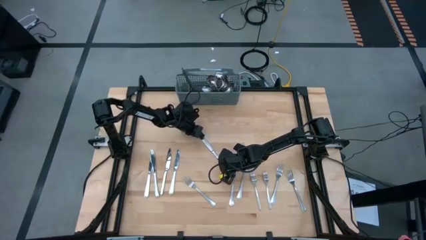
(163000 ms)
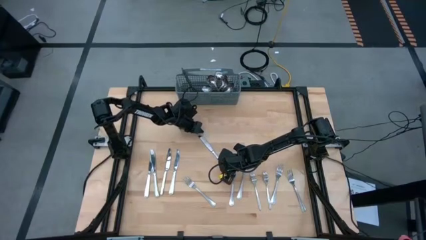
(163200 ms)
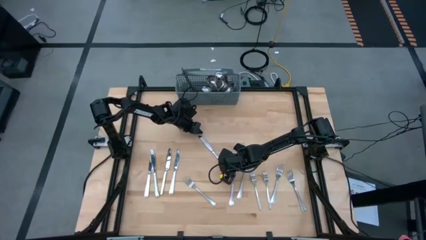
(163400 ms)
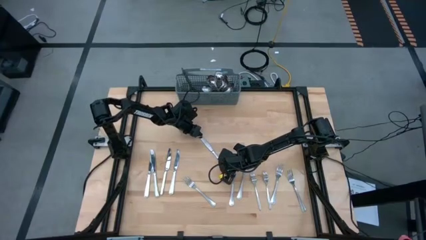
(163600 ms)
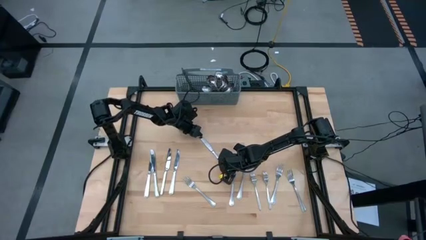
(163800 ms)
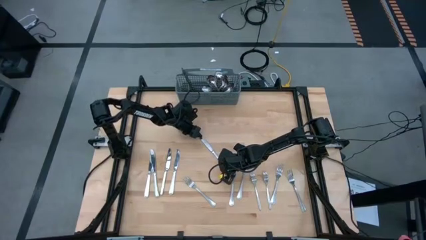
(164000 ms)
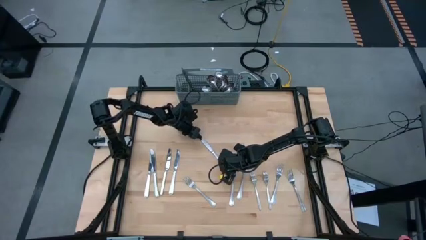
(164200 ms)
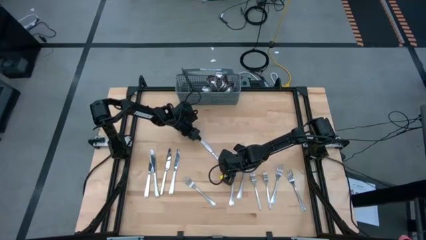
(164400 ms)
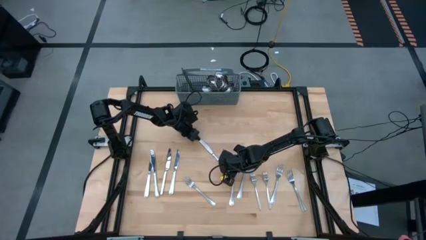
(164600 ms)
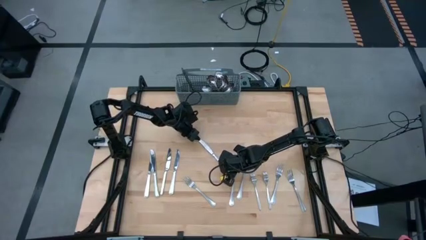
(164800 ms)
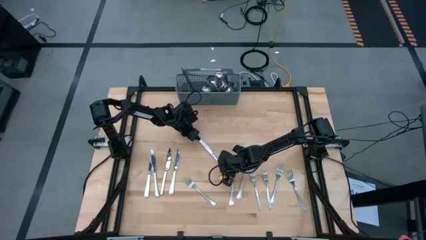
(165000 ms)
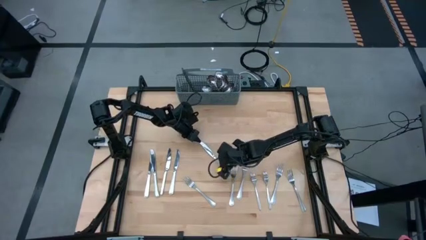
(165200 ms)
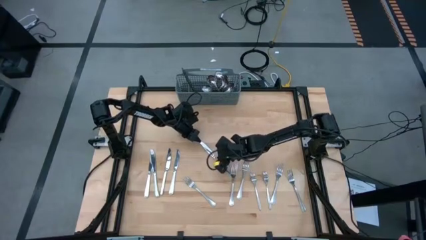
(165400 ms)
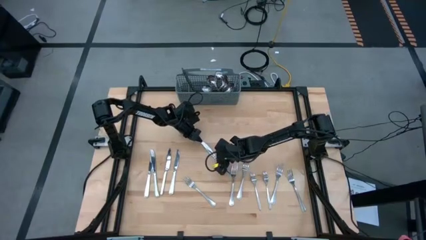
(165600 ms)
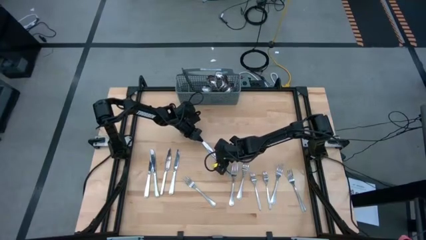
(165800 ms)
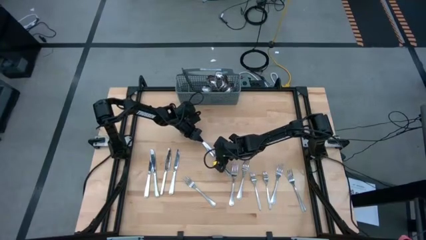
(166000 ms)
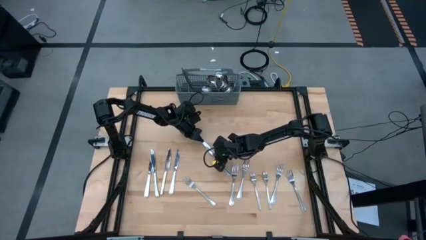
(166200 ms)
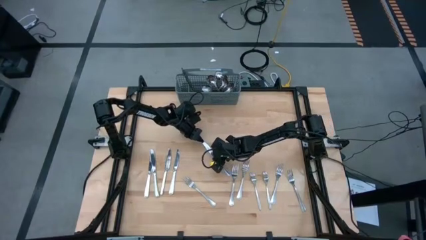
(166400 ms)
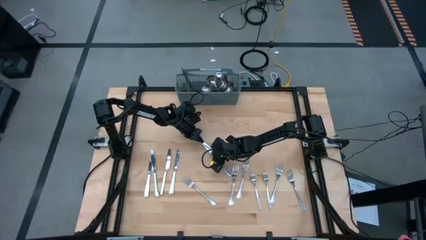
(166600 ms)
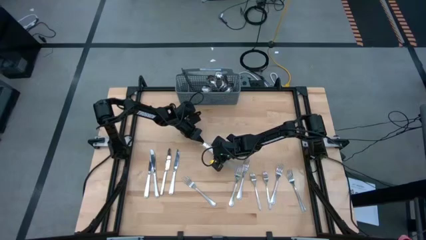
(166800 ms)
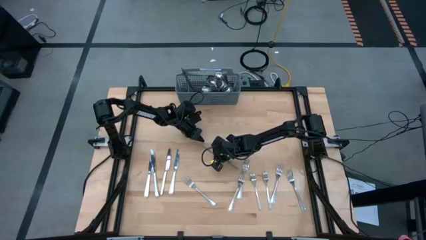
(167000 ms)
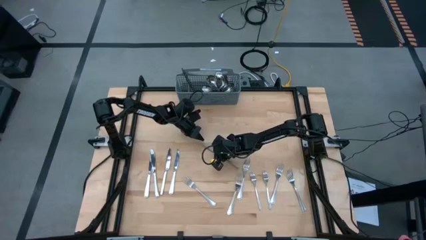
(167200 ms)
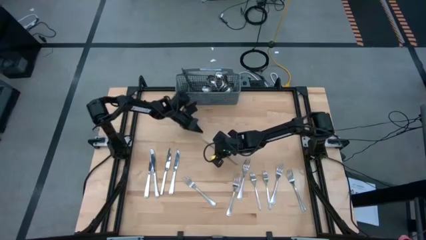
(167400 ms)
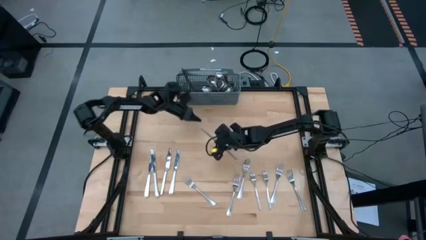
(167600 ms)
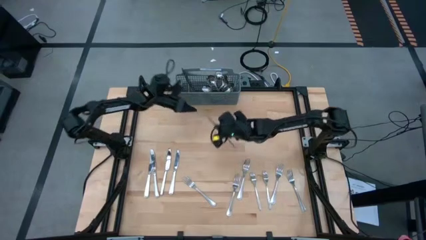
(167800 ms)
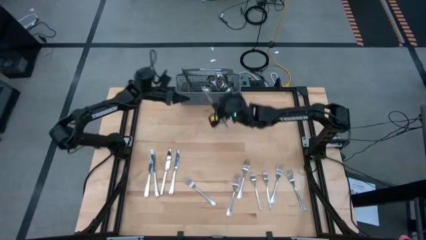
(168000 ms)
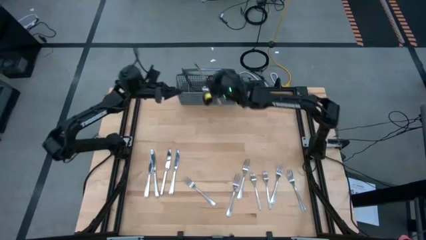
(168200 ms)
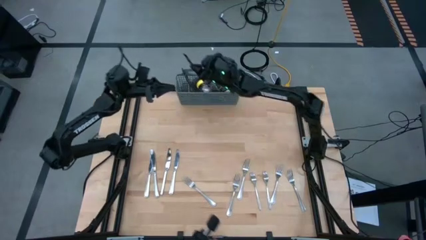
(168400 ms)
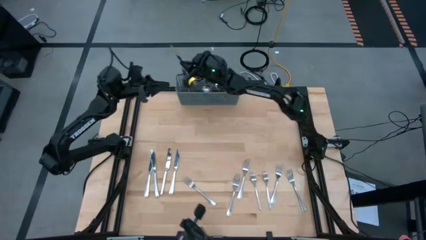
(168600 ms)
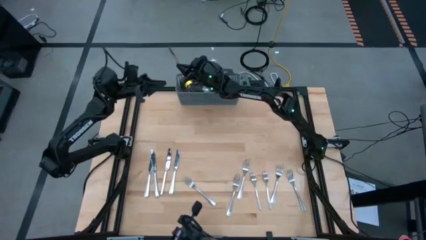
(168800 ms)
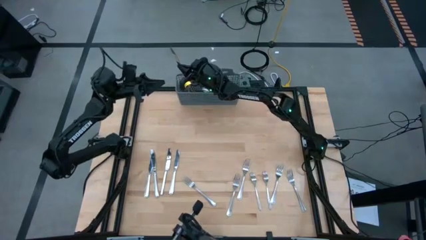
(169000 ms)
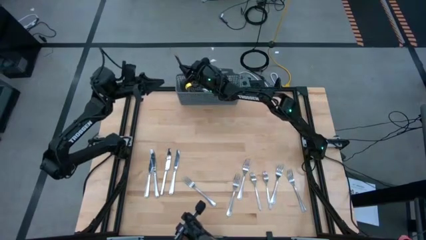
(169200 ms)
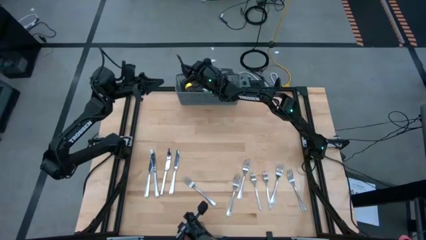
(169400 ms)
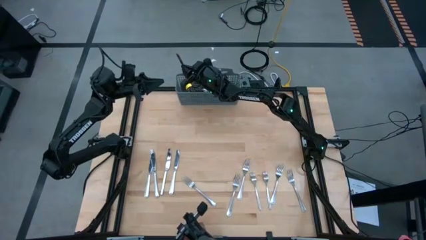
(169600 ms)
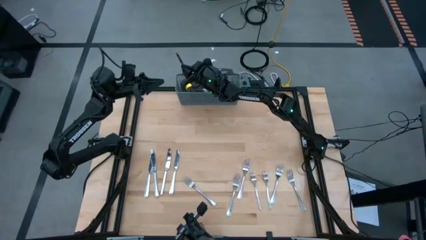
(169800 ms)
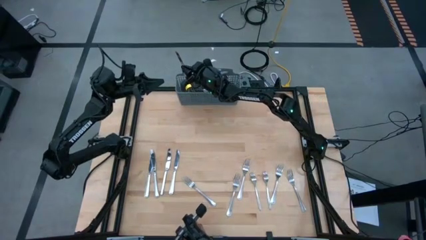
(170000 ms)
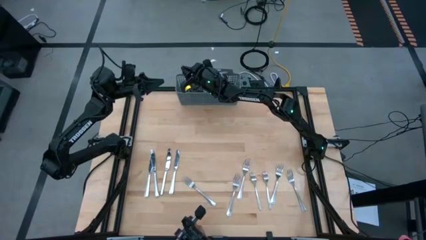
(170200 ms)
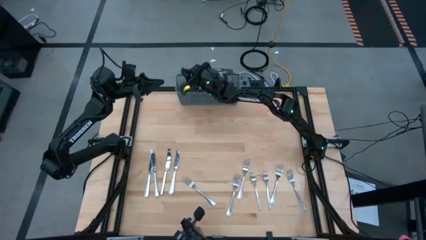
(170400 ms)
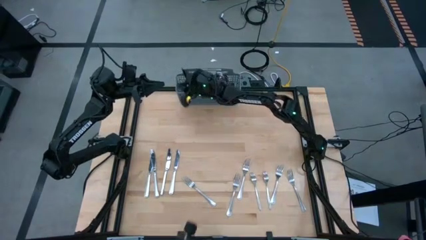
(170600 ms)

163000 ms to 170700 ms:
Task: Sort silverware
Put the silver knife into the gray utensil holder

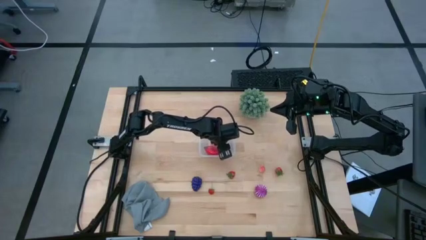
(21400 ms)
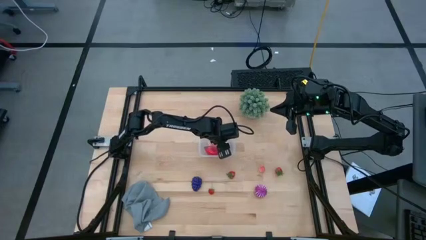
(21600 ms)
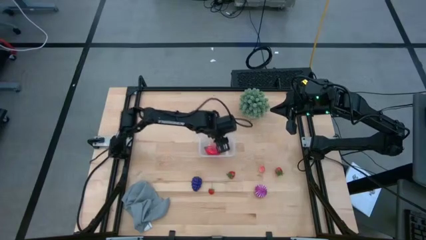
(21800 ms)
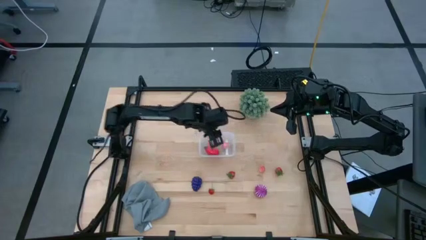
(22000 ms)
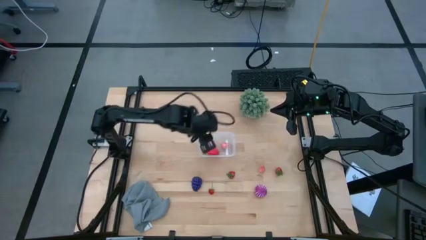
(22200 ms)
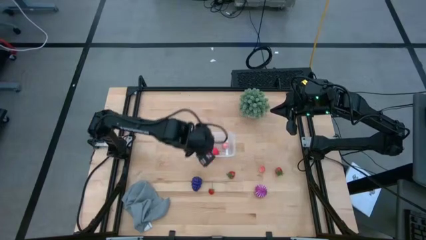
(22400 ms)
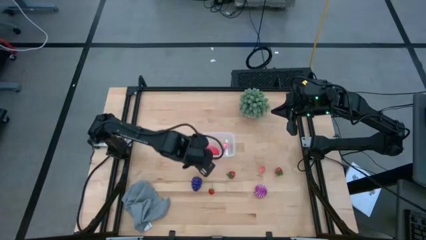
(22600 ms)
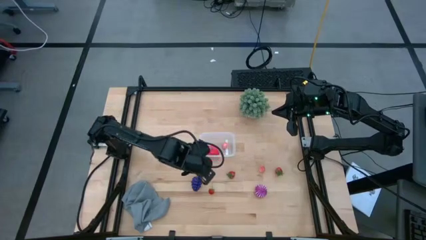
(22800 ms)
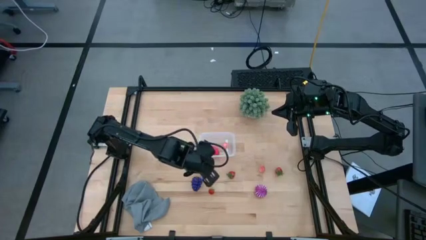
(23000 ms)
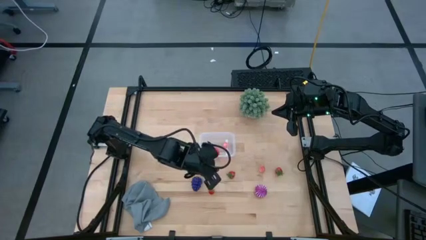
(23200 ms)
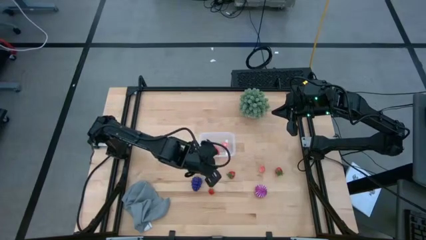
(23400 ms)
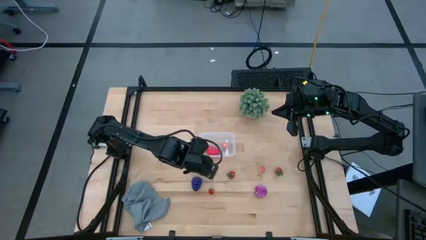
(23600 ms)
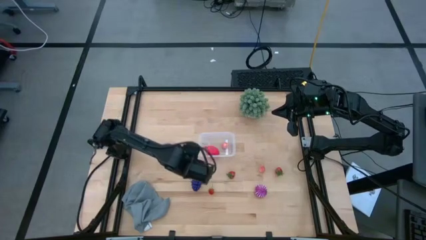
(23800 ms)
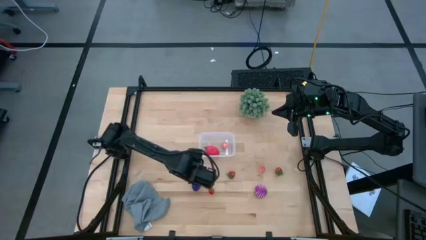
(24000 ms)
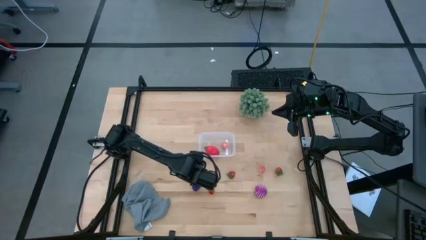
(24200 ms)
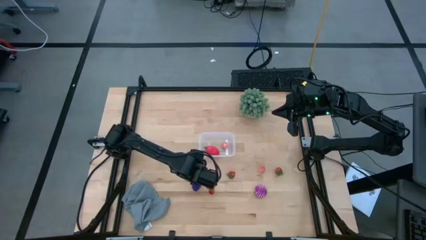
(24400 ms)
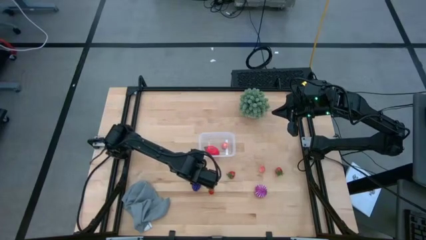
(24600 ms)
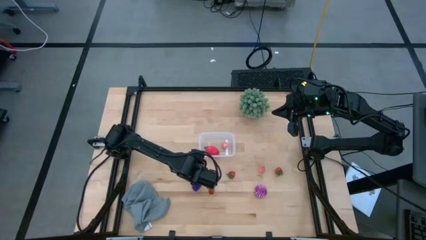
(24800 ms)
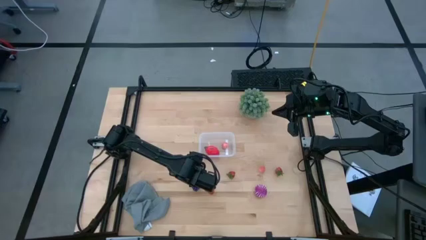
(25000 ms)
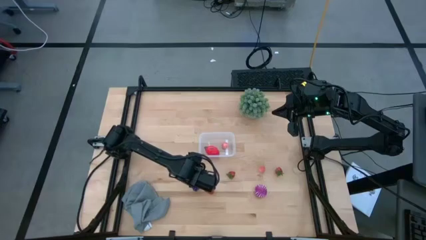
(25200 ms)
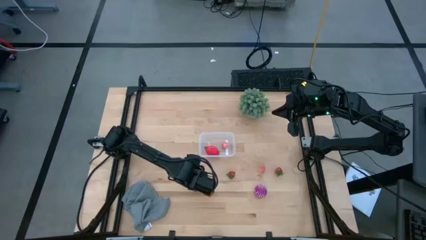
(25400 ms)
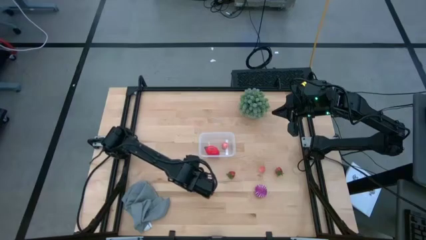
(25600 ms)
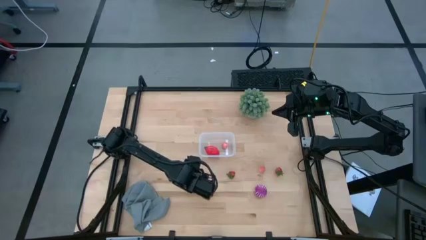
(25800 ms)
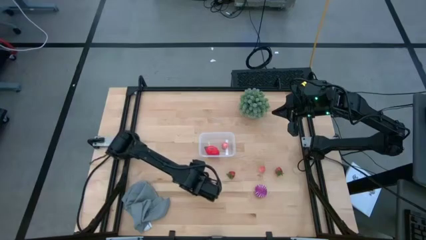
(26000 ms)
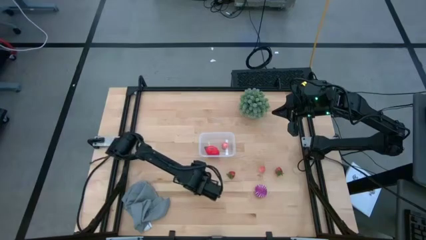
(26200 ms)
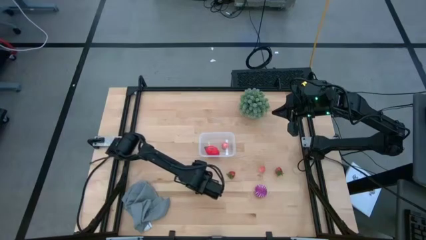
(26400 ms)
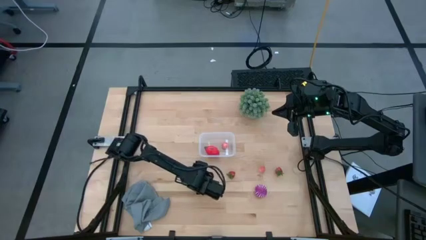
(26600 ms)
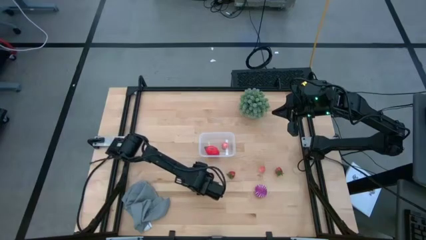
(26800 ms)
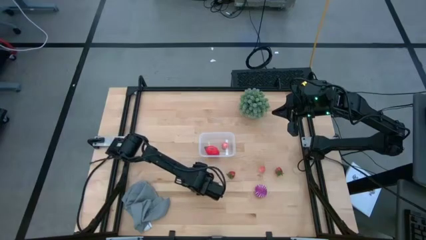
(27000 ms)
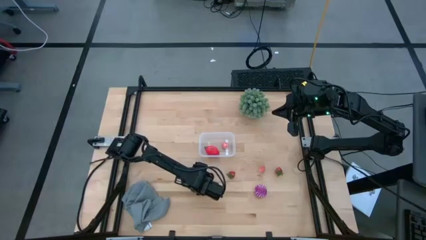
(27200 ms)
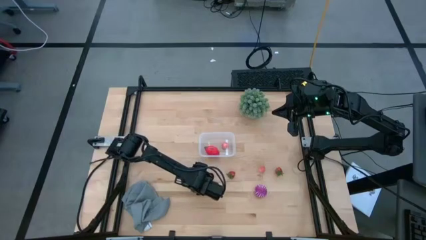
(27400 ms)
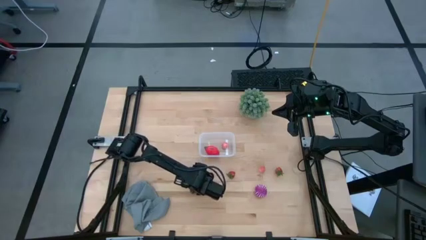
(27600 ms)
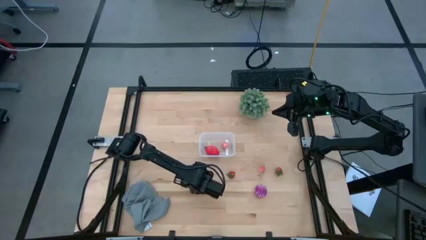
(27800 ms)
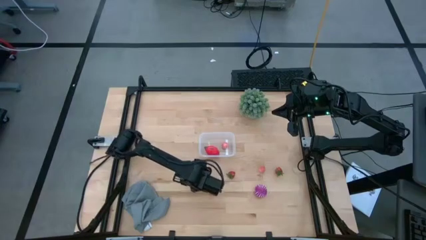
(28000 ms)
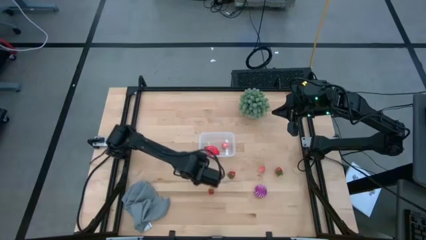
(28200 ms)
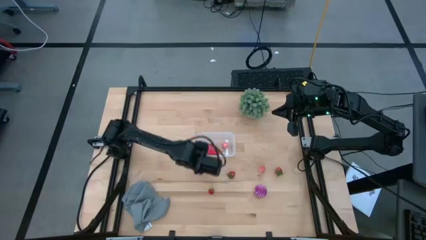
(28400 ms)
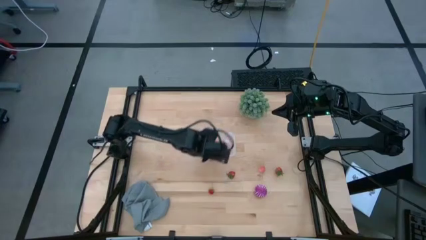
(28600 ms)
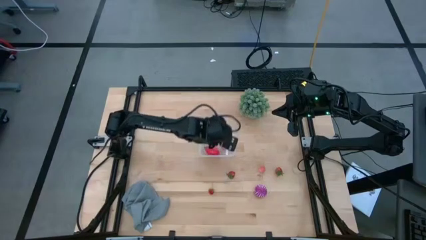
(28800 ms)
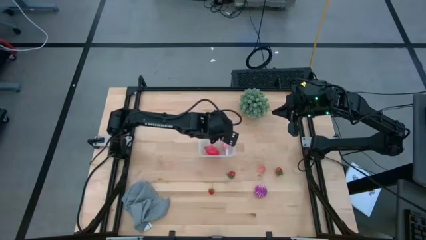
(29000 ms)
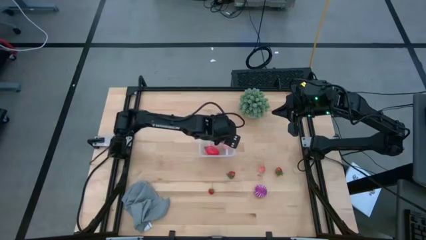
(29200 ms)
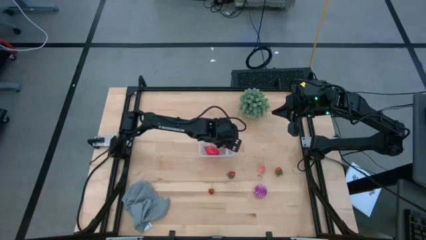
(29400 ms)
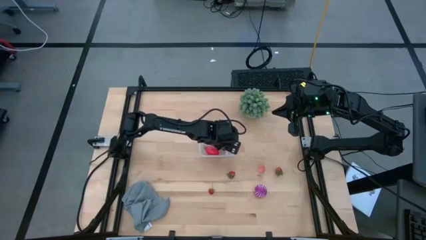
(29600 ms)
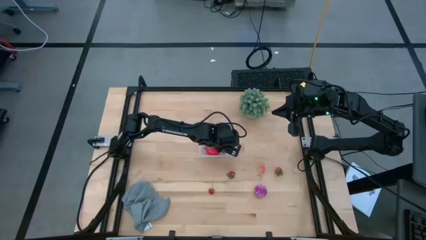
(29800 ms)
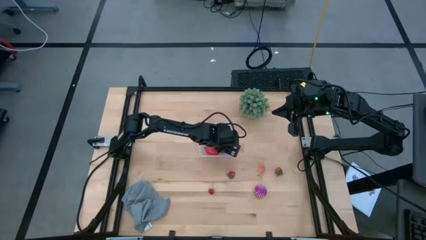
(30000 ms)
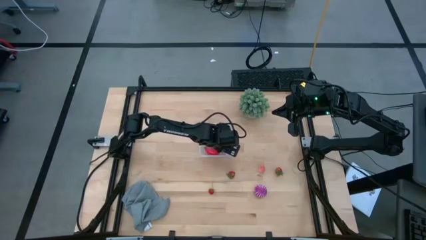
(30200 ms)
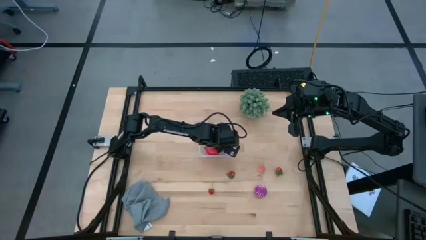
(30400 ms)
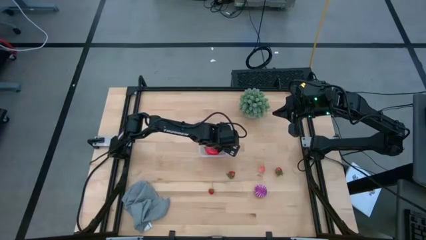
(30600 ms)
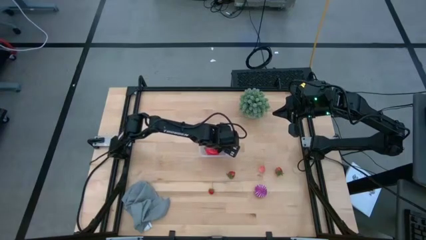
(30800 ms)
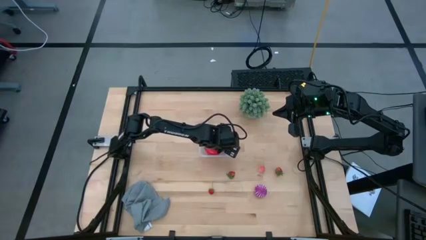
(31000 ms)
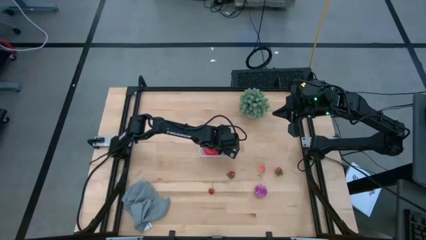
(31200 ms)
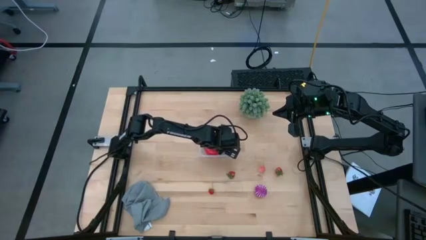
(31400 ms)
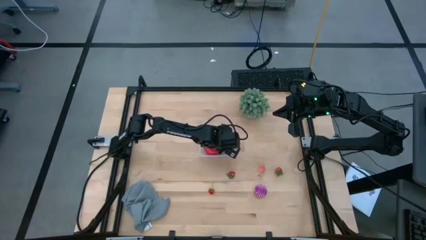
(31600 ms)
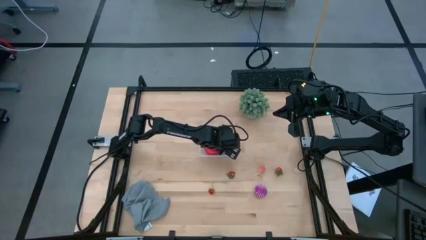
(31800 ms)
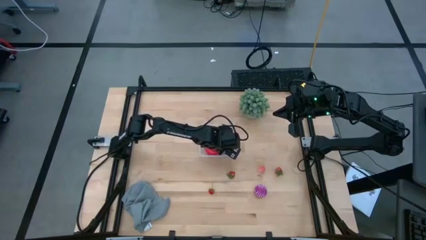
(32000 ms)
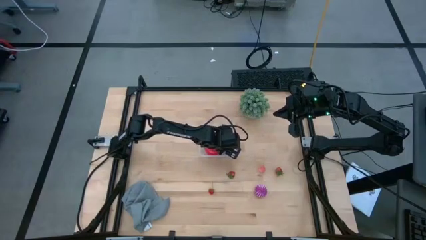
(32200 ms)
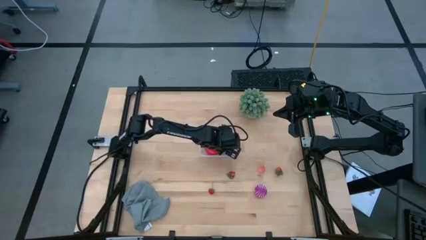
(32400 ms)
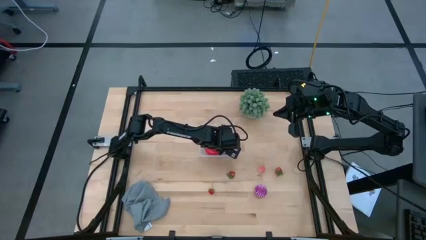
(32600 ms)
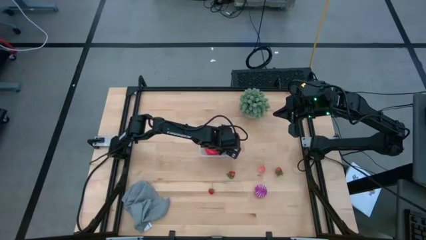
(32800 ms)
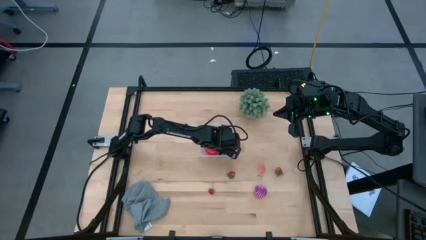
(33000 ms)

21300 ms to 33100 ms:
Task: Pick and placing Produce into tupperware
Put the purple grapes into the transparent bin
